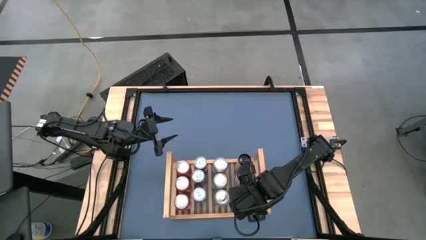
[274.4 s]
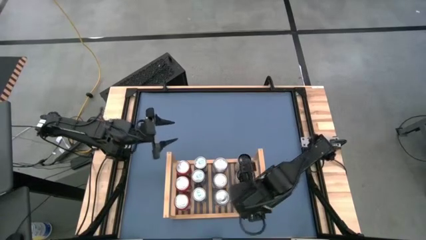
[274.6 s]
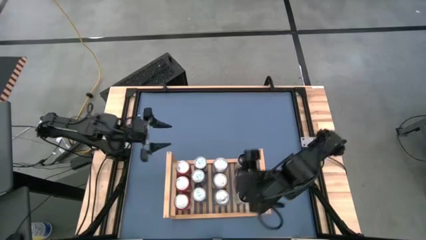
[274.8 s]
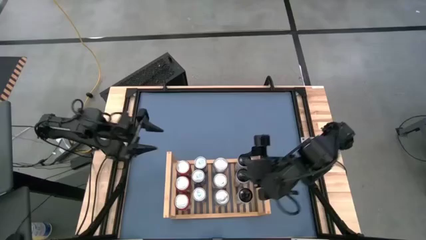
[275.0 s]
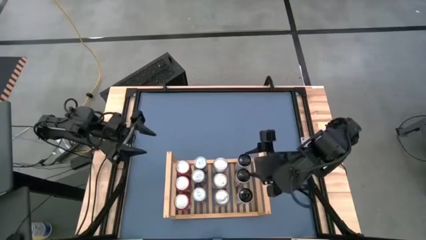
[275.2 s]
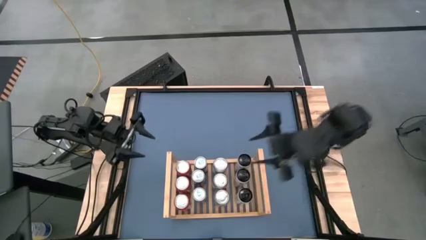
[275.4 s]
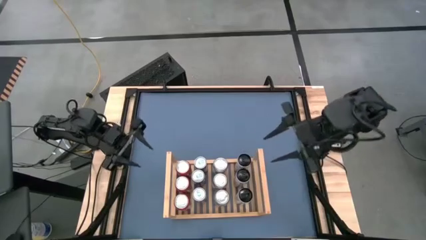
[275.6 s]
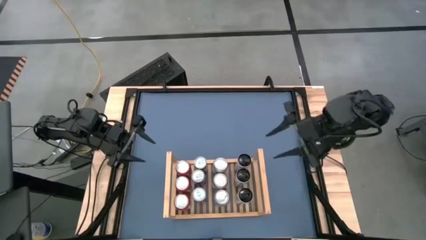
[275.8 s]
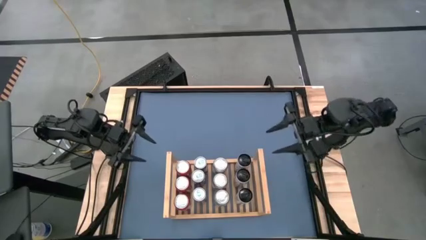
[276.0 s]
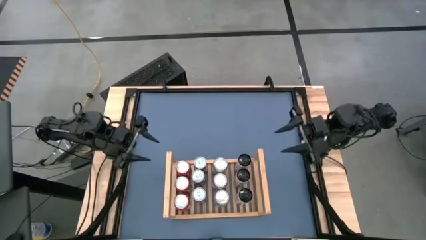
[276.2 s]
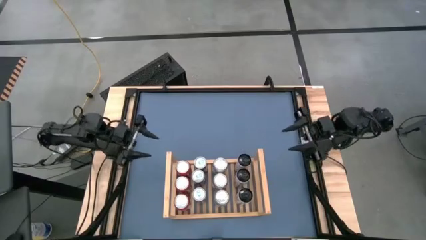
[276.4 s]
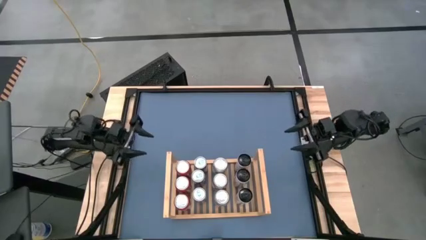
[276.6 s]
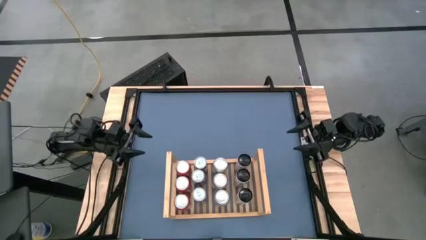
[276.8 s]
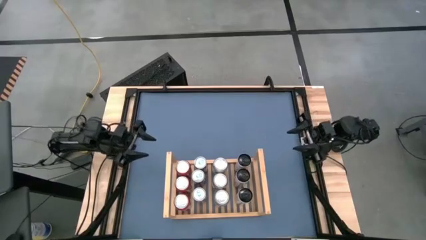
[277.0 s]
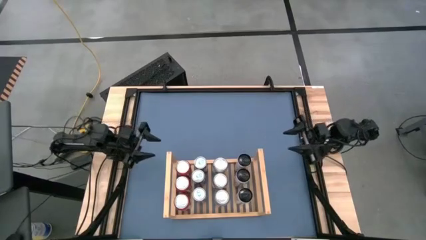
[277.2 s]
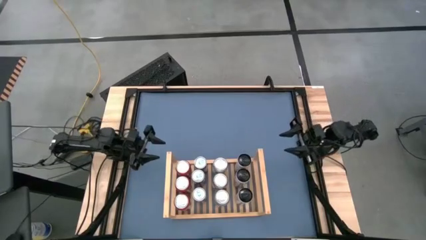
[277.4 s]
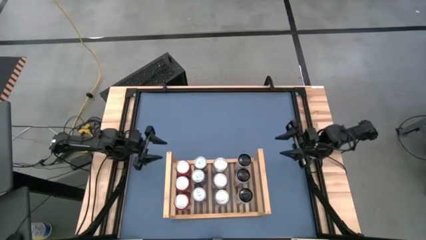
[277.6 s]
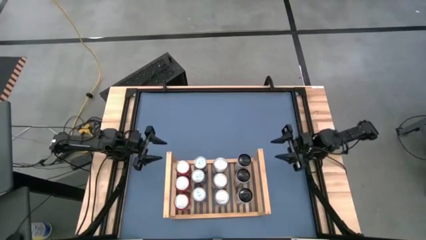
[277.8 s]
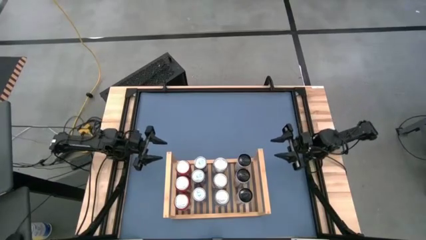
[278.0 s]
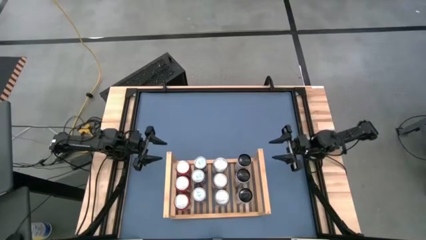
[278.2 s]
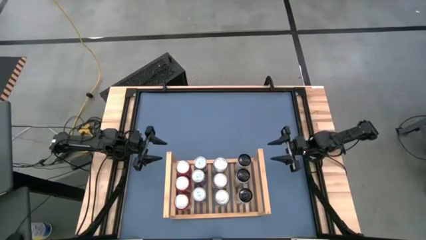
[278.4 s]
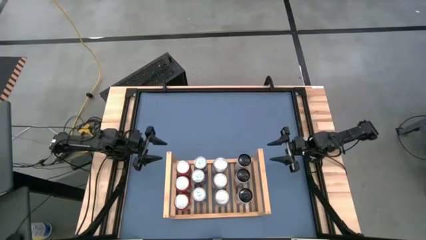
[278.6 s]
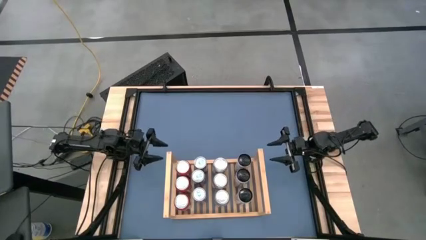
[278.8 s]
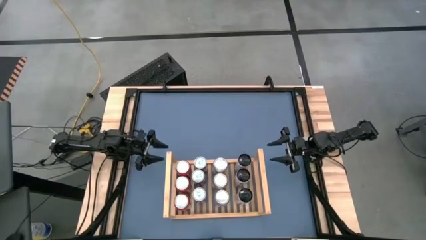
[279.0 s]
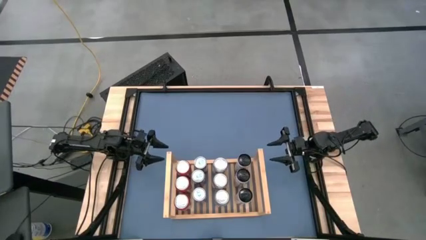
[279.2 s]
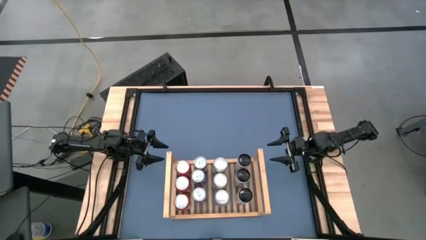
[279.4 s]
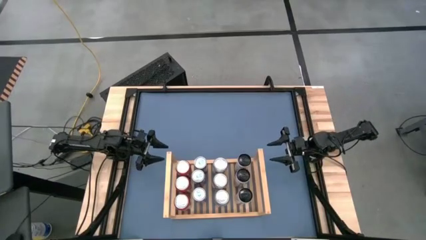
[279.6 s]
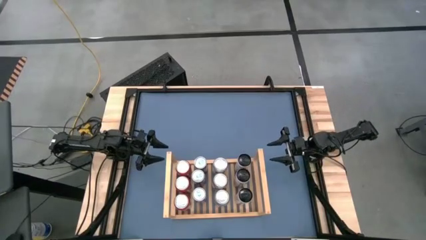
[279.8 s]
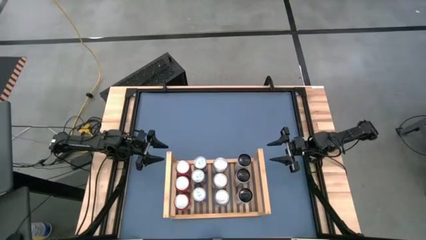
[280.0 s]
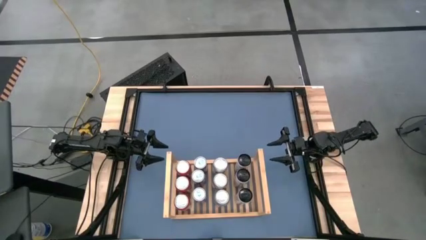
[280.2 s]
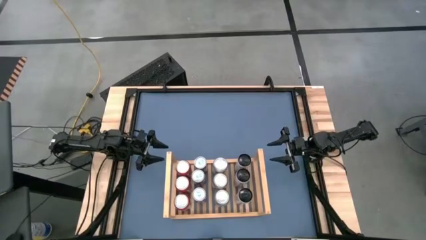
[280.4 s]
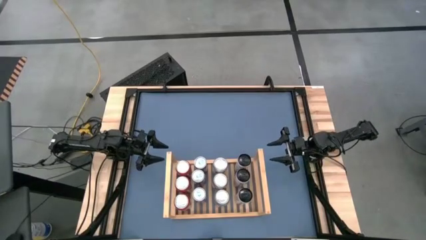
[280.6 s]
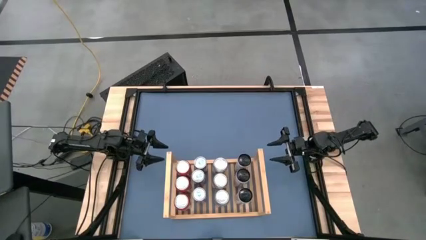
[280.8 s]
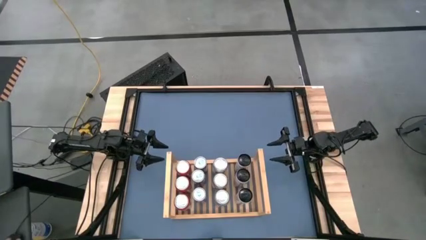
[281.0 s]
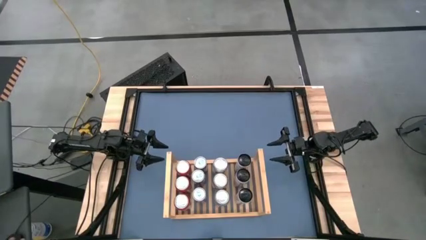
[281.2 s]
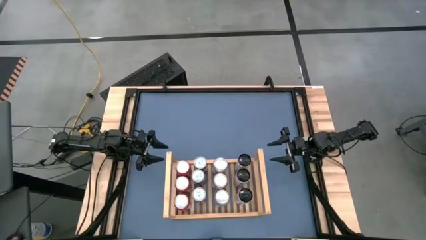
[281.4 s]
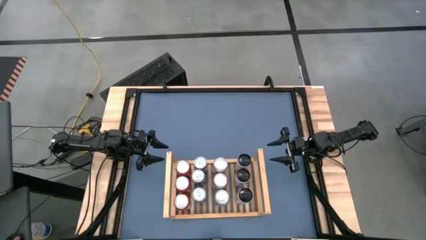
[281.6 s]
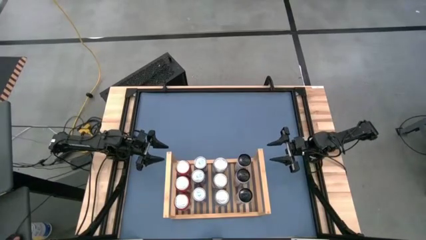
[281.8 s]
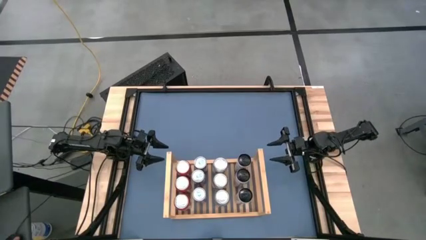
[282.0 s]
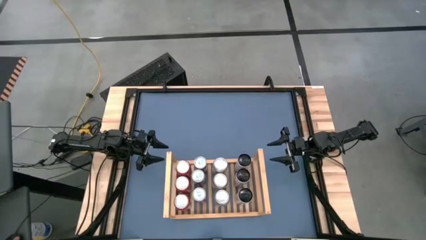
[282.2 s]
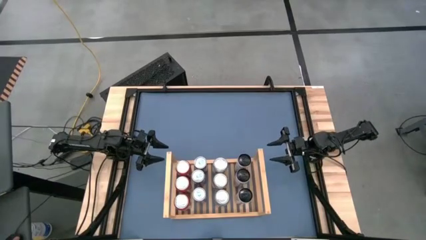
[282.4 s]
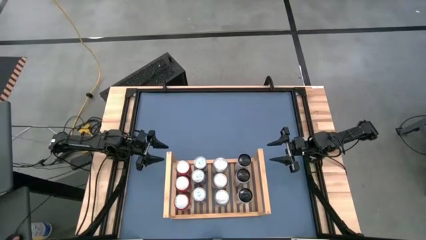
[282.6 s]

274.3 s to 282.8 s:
Task: Place canned beverage on shelf
Return to Home Position

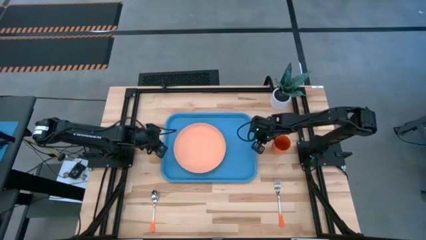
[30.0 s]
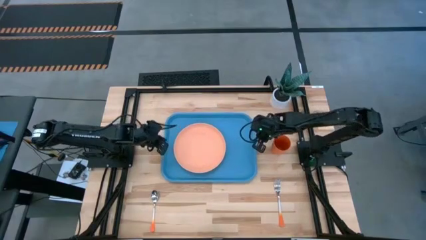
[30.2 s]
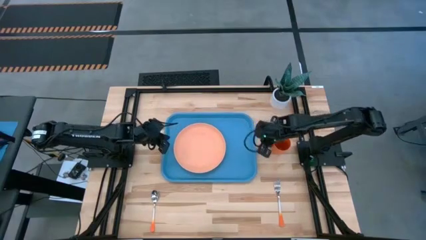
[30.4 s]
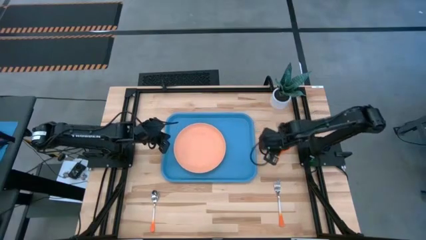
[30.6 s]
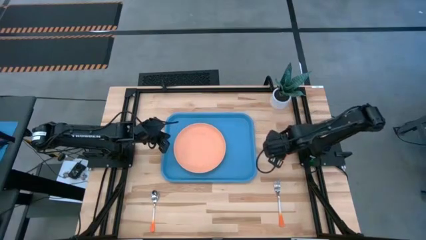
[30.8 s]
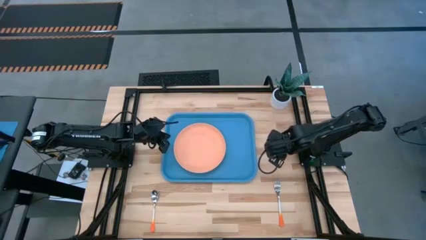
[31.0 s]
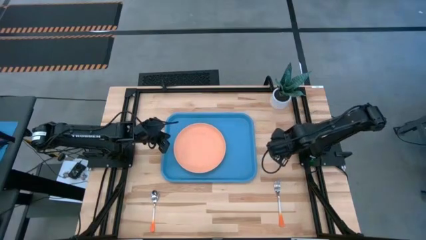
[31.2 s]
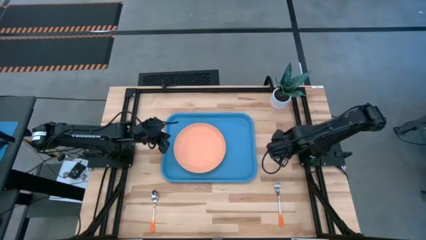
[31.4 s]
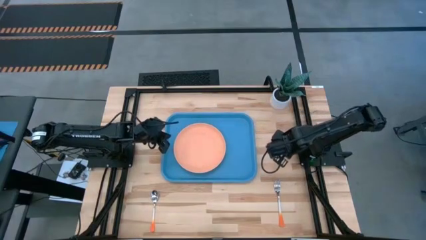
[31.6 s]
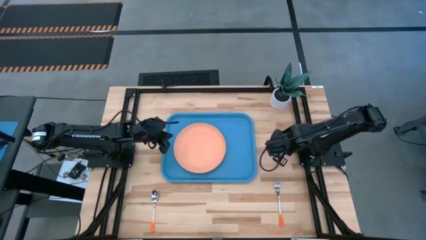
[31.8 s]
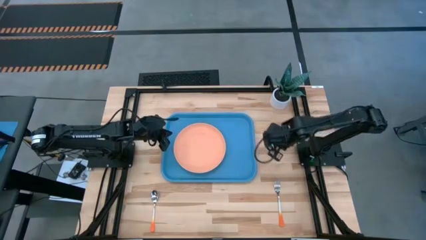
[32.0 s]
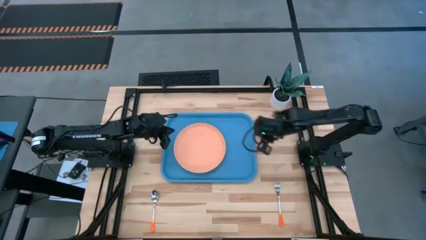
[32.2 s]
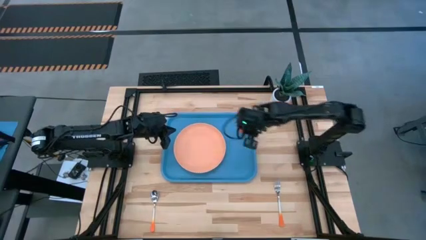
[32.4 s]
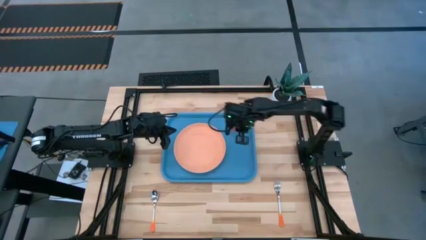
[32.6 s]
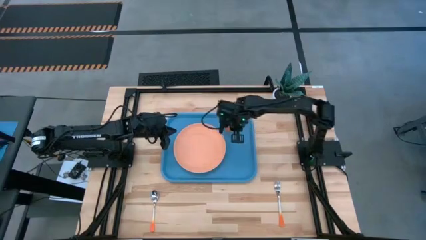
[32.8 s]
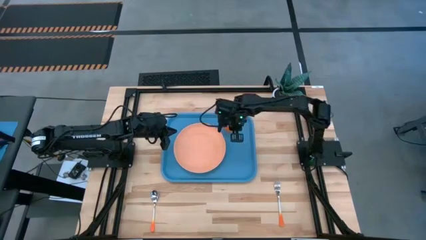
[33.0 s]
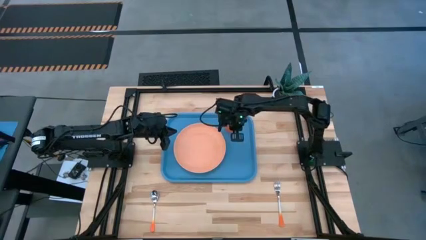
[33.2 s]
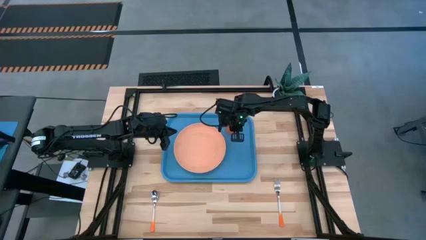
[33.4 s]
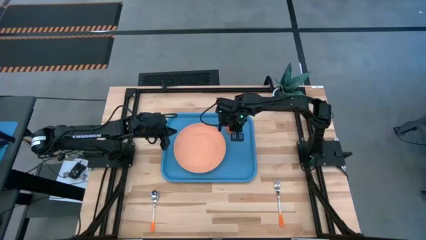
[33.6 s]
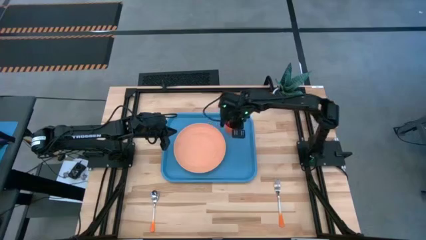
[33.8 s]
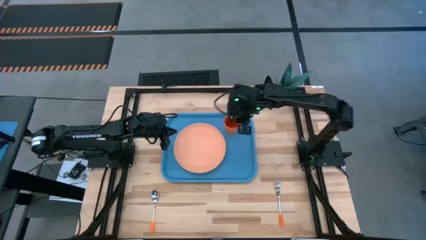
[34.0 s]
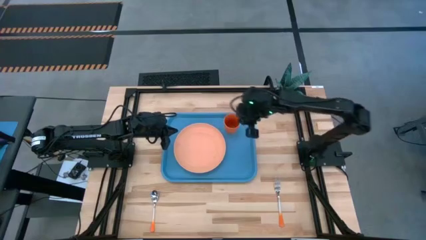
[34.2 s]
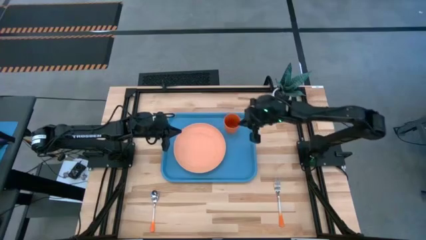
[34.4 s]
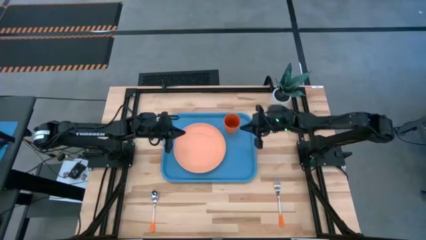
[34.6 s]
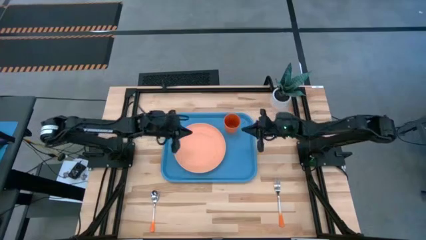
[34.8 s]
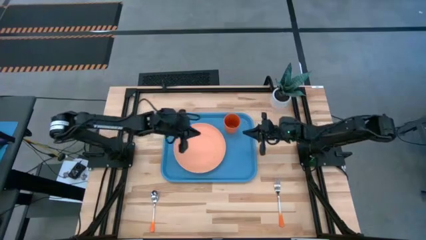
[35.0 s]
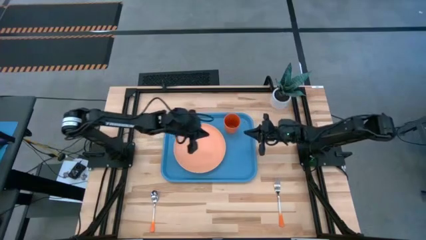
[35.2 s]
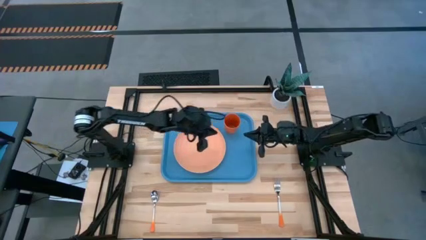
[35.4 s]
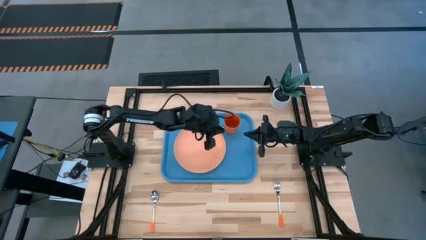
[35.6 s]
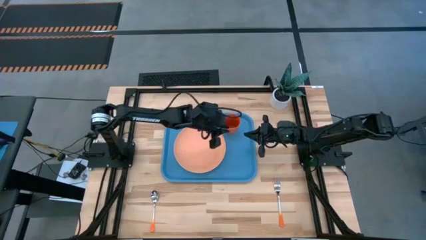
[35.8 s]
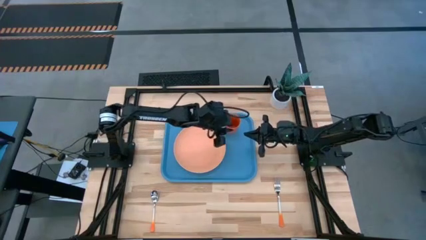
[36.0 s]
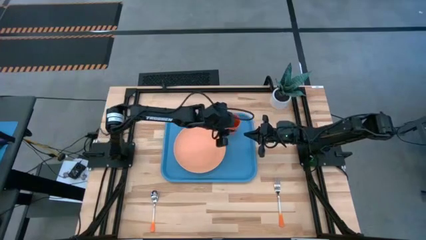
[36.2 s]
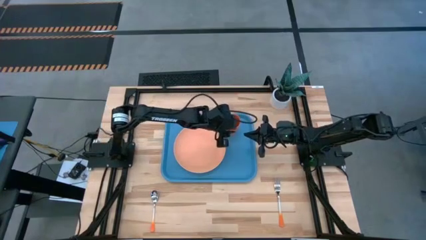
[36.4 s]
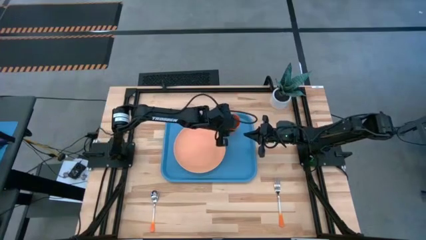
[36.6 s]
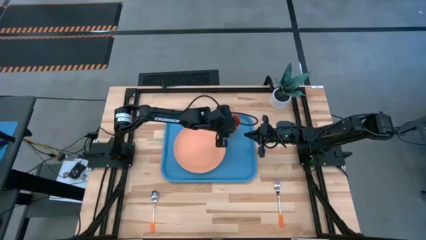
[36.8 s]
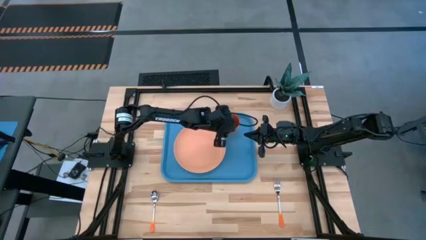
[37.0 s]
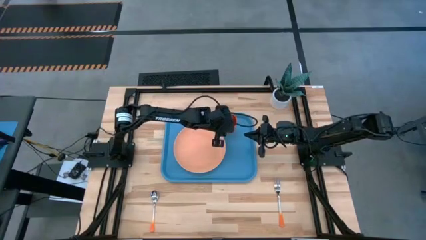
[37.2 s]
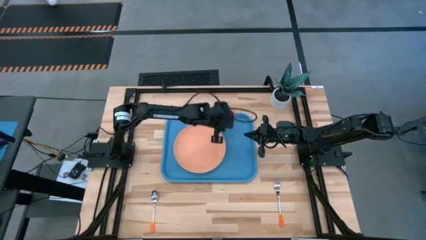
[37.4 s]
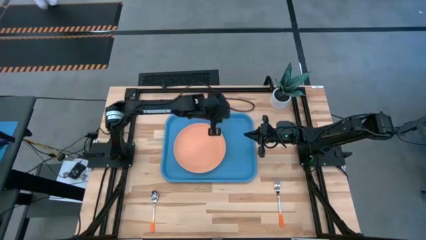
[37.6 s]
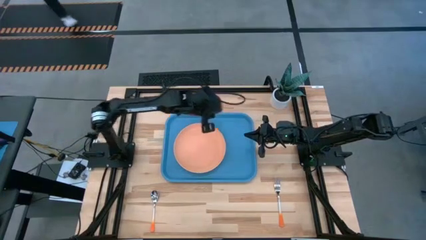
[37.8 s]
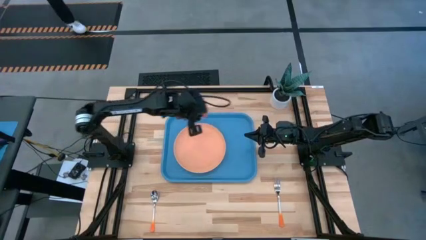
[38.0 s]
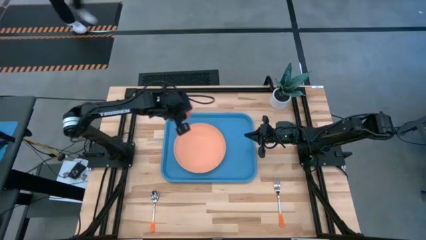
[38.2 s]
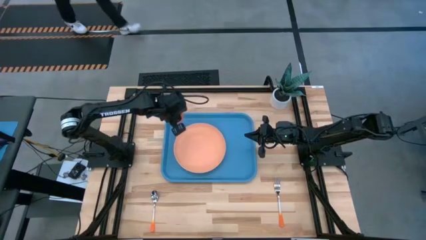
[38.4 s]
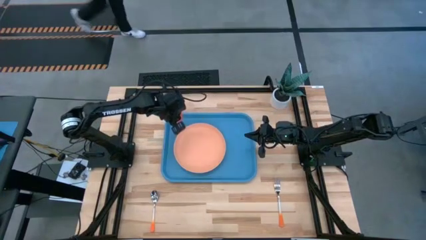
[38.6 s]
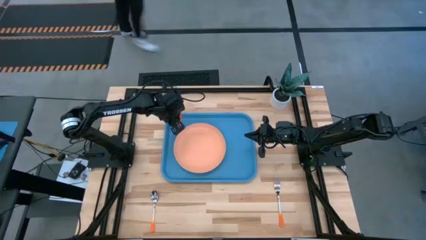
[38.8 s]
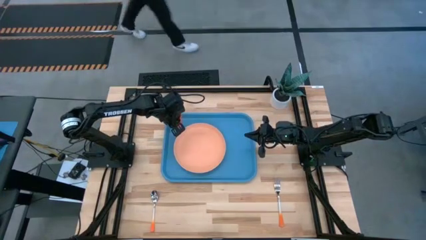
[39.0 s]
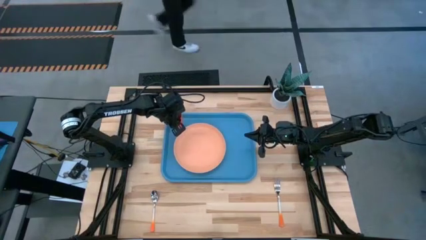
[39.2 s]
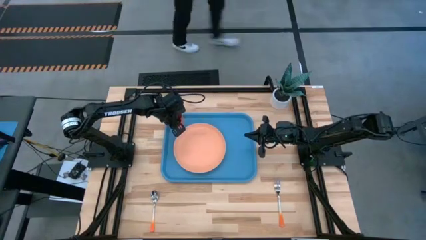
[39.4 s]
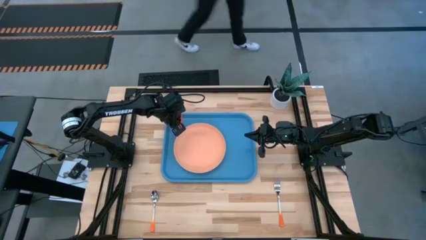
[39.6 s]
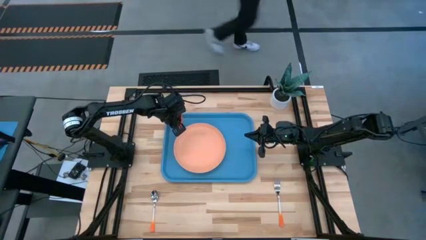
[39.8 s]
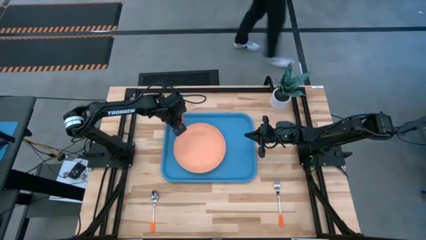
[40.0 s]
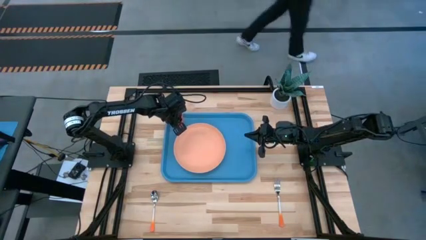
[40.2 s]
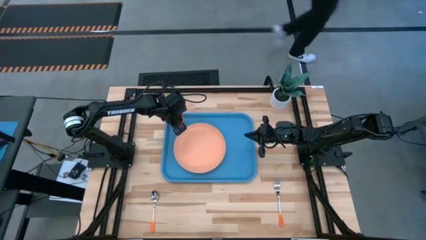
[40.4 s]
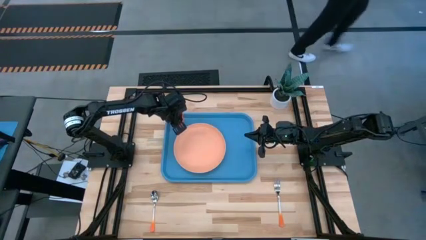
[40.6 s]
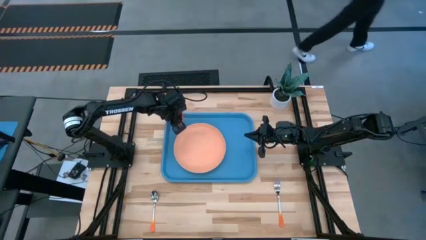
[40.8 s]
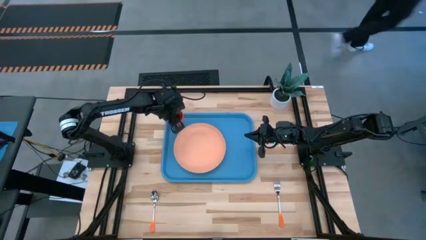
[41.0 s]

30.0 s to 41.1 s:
Task: Pick and place plate/cup/fork/spoon on tray
Put the orange cup on the blue tray to the top left of the orange plate
